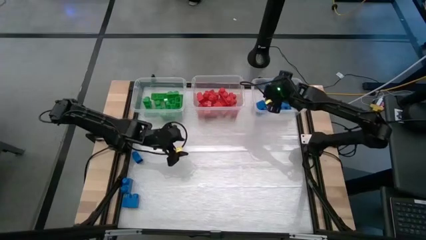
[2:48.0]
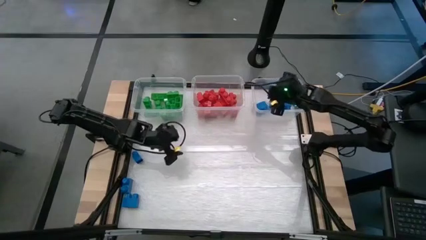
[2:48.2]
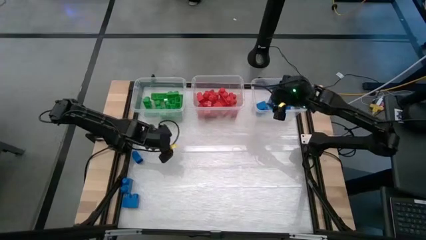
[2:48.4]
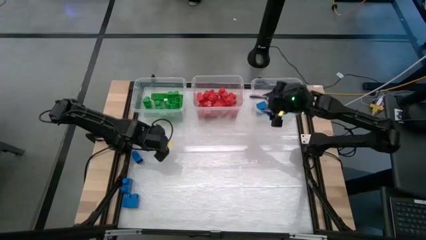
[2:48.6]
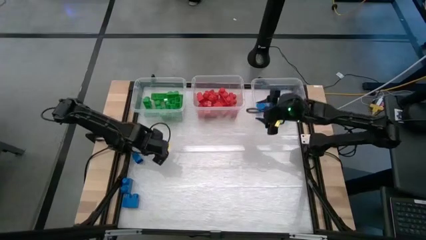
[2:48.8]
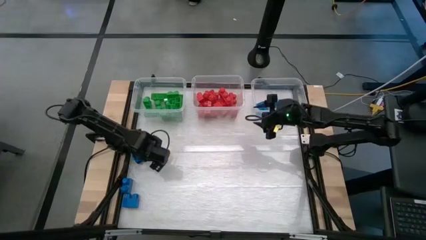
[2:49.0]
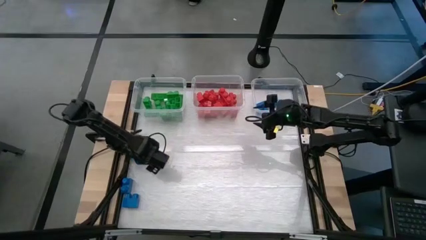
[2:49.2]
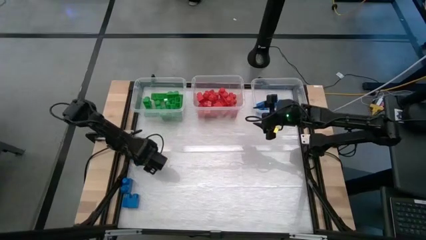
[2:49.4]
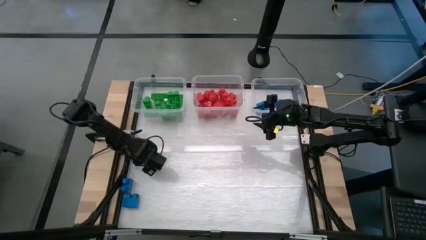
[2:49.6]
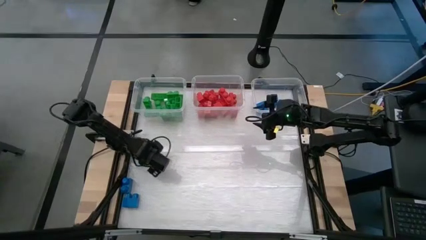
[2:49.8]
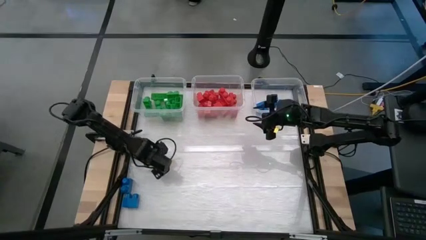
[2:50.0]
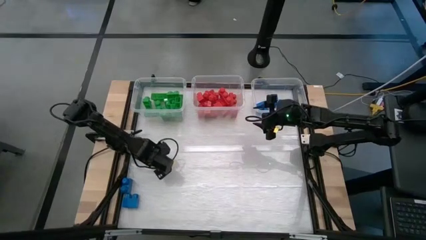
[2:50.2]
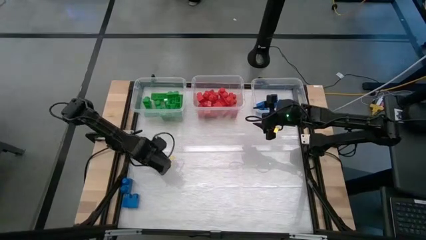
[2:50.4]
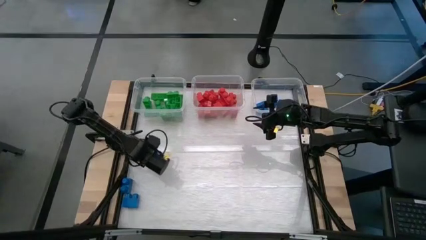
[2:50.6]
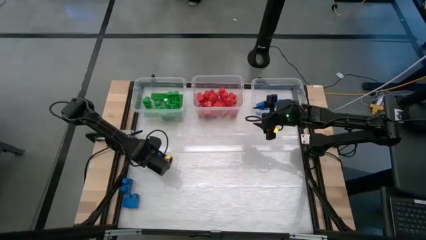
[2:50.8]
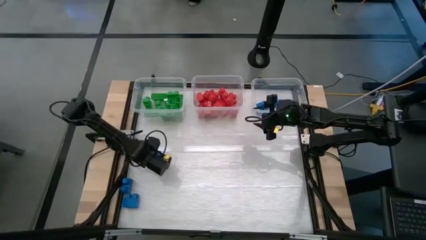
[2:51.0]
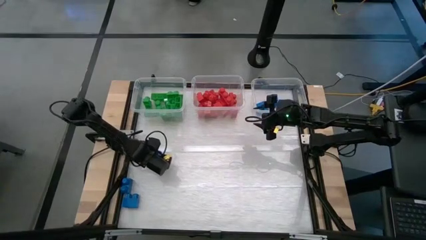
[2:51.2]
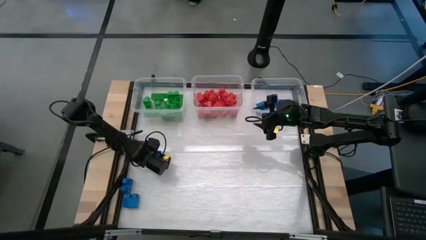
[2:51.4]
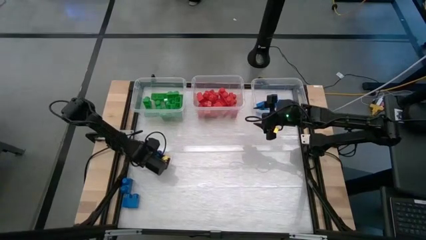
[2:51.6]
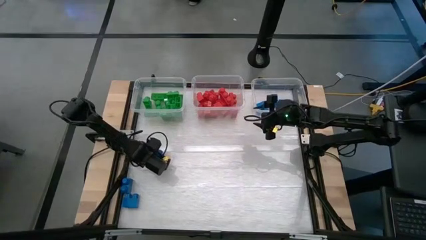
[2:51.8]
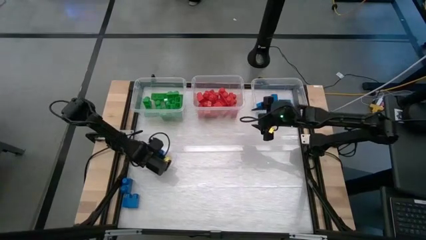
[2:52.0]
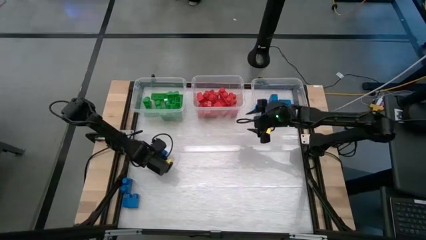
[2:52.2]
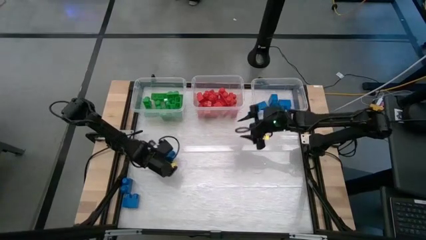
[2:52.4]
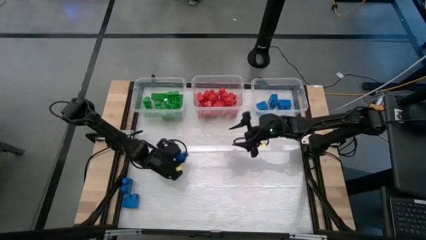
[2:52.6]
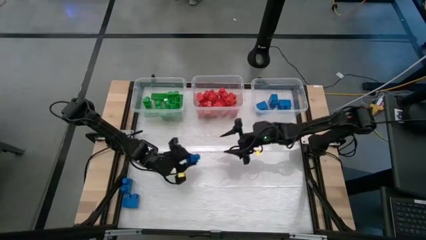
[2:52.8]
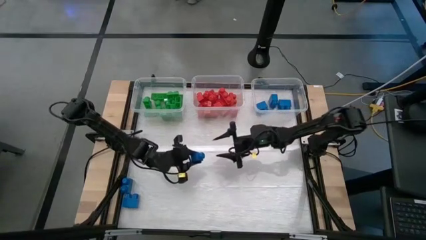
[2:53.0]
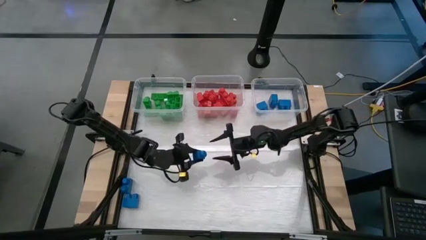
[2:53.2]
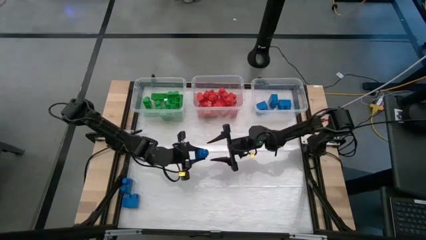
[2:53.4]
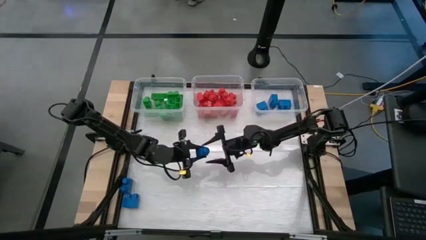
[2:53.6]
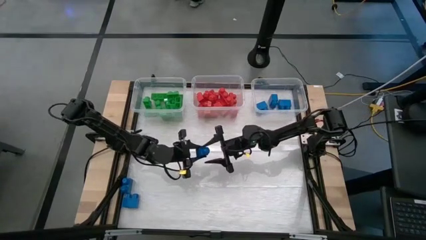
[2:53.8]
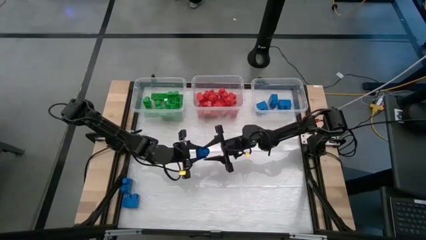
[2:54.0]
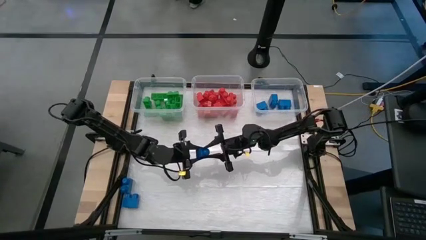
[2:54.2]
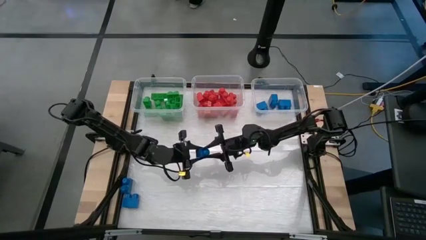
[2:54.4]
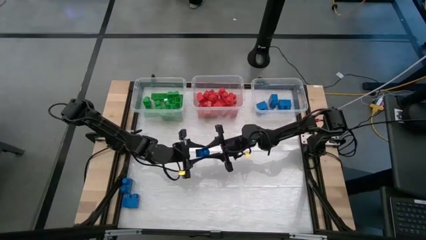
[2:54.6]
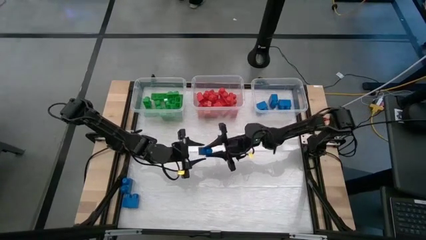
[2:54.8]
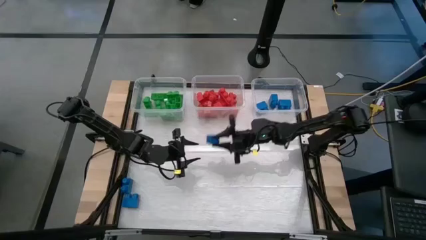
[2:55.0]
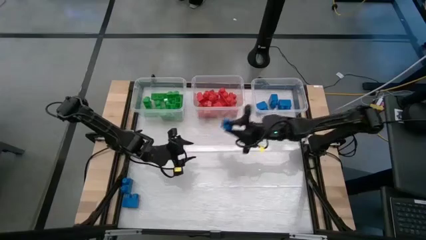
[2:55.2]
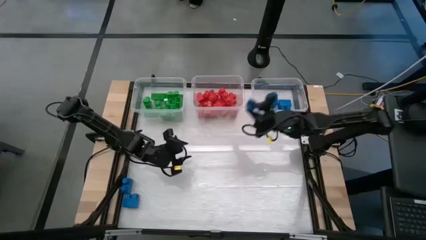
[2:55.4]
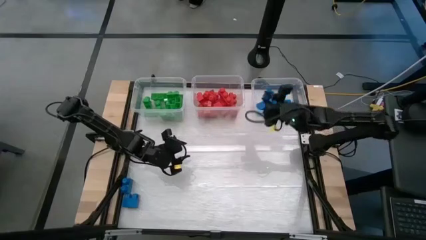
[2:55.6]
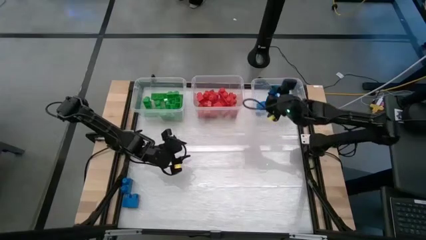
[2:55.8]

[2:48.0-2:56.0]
Task: Sort blocks
Put the blue game piece into the right transparent bin

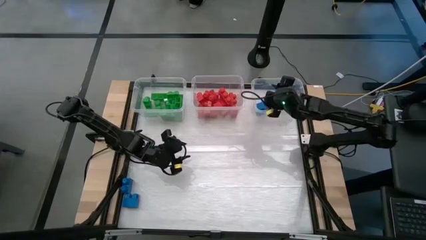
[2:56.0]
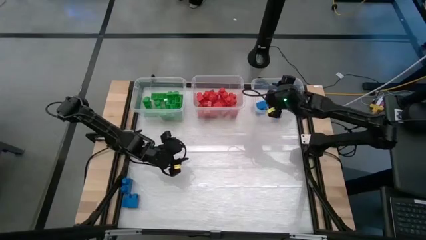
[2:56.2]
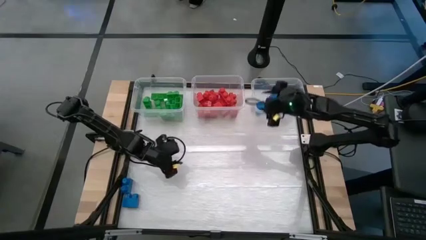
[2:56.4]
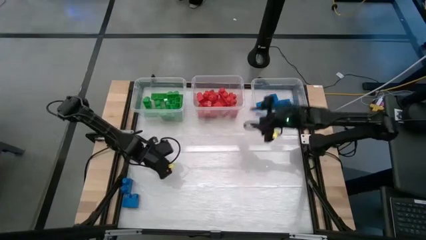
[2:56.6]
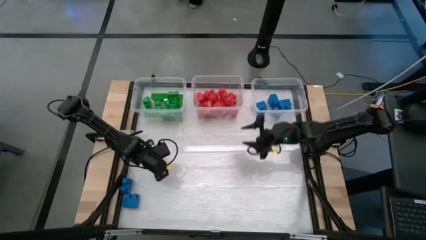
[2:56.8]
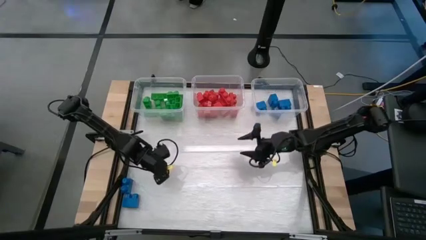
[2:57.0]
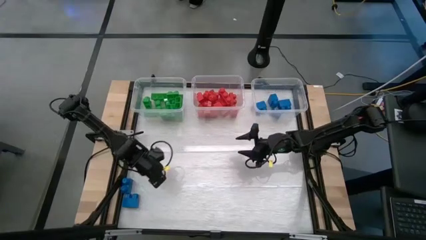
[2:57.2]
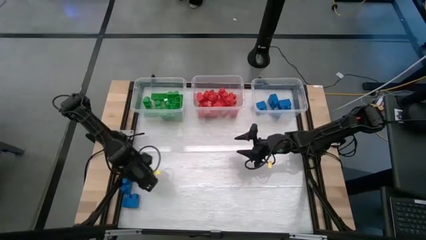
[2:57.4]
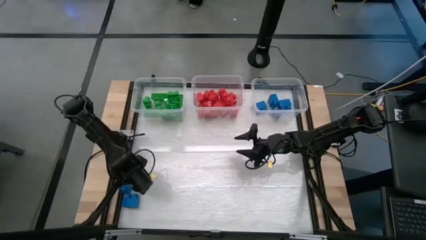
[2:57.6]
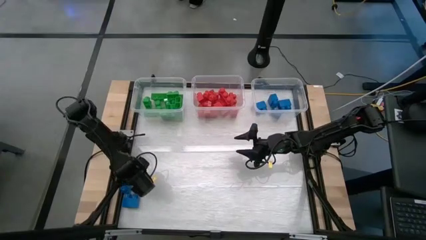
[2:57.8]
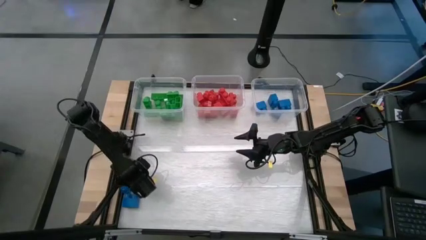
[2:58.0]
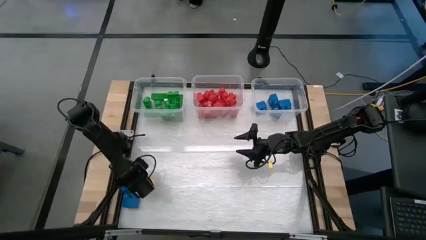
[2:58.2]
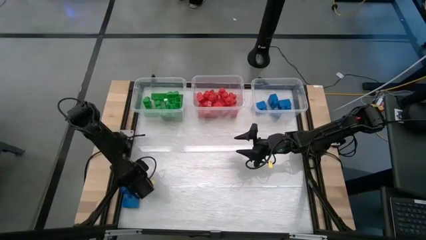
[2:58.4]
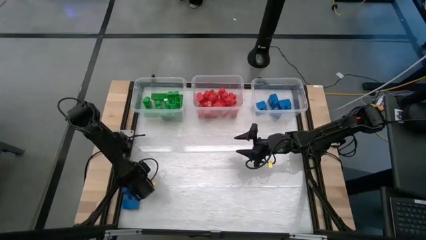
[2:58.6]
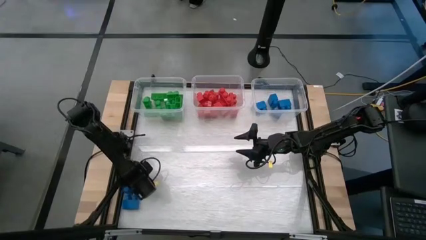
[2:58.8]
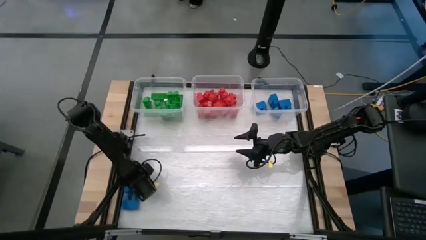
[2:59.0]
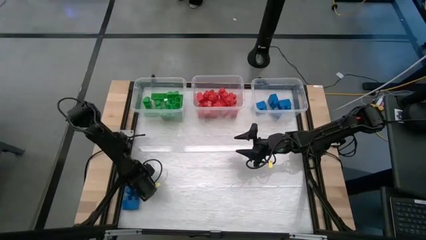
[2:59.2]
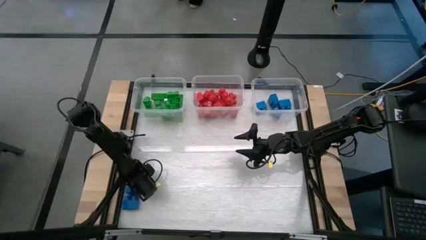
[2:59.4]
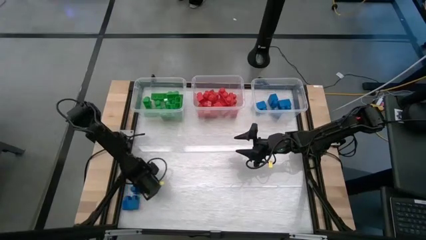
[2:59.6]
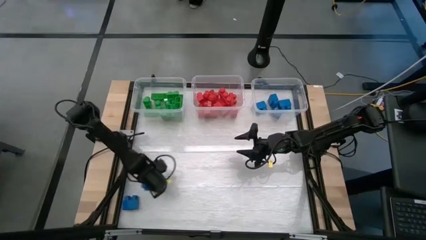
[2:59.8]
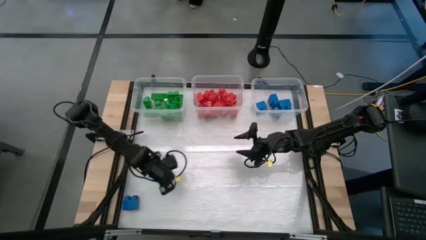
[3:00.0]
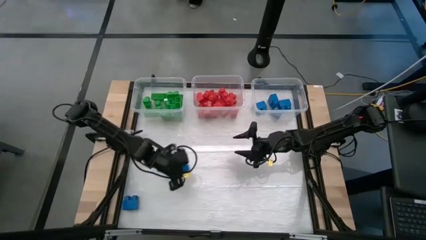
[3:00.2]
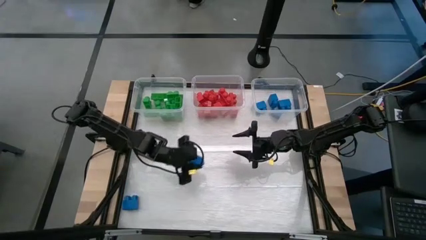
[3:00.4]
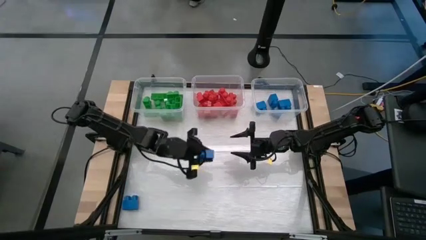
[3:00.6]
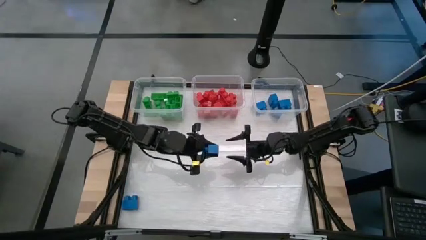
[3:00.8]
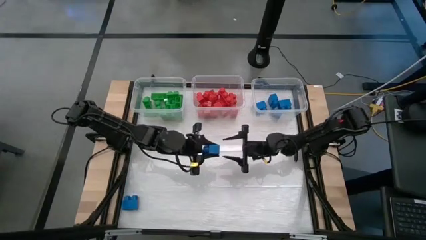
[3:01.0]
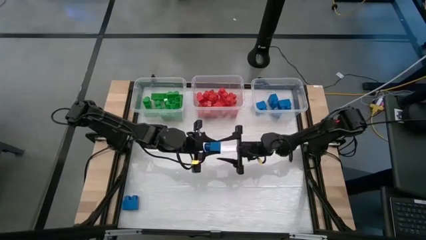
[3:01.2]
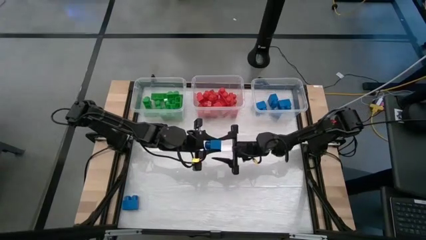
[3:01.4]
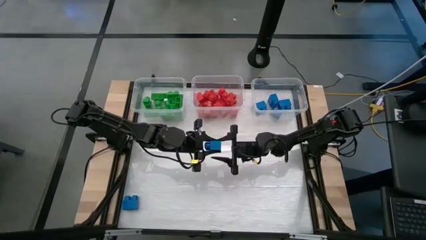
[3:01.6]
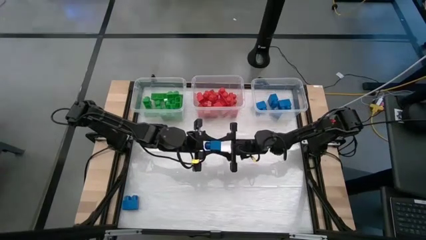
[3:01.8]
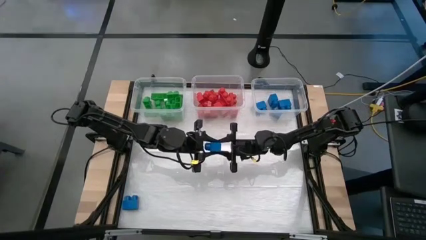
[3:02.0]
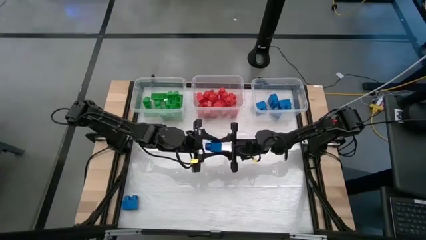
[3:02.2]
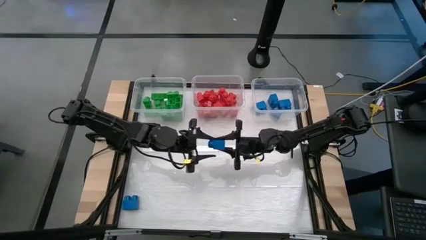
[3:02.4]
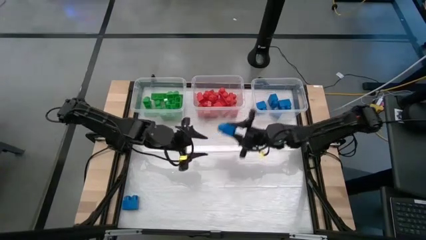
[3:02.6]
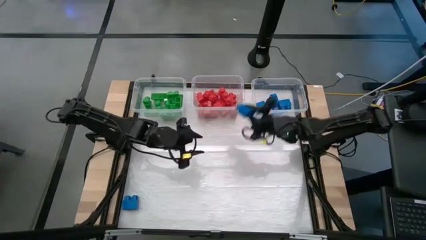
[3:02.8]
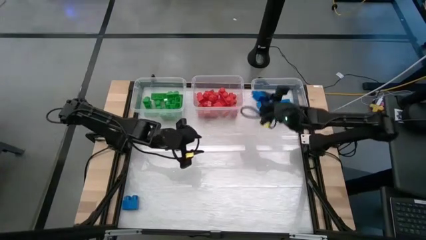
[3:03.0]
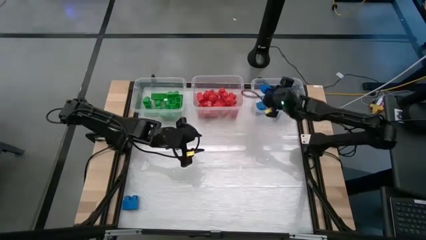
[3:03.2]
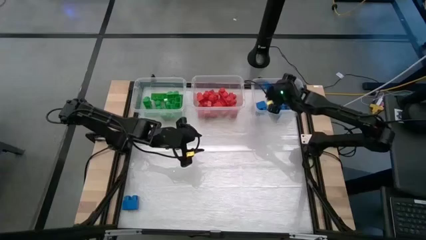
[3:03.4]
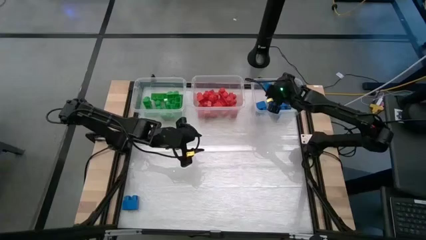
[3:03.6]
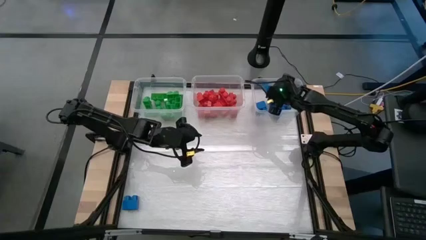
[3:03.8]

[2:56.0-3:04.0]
Put the blue game piece into the right transparent bin

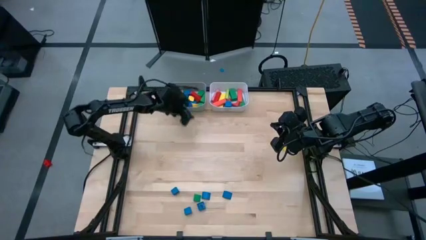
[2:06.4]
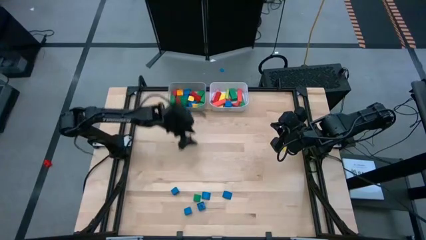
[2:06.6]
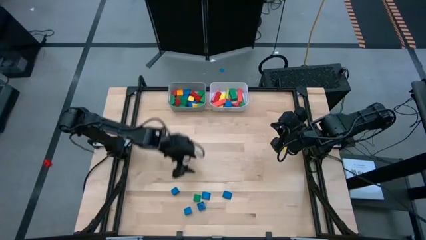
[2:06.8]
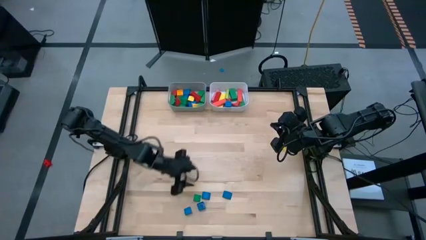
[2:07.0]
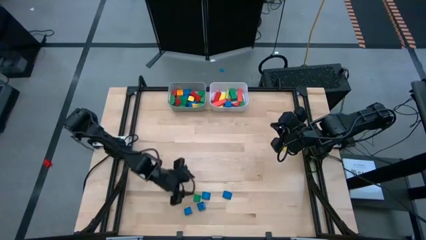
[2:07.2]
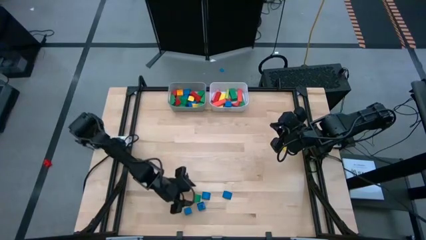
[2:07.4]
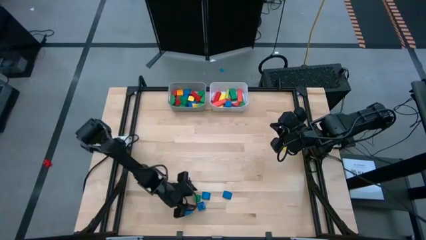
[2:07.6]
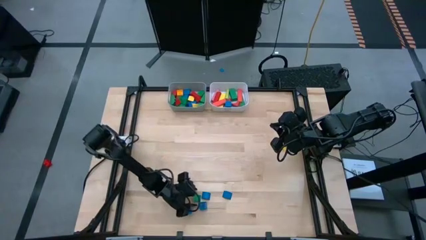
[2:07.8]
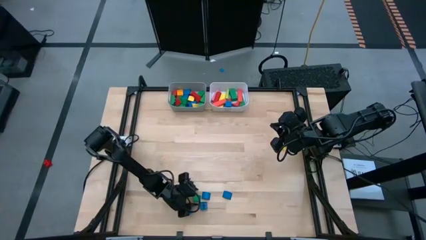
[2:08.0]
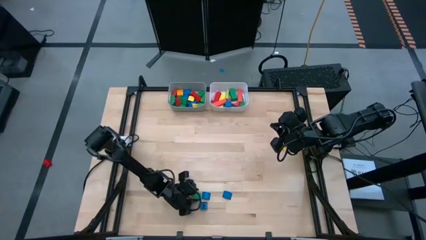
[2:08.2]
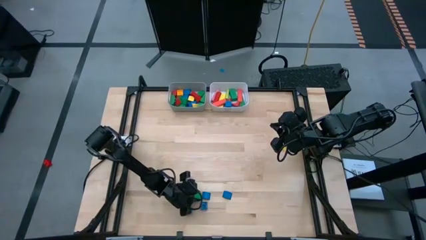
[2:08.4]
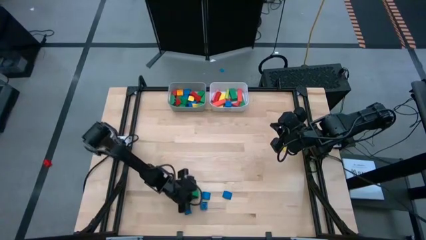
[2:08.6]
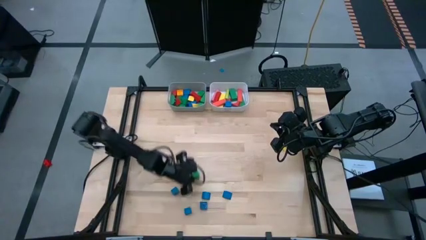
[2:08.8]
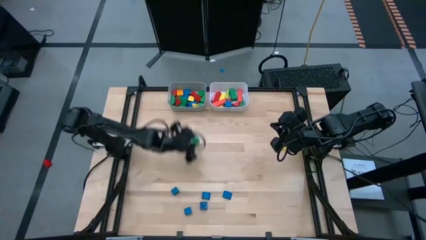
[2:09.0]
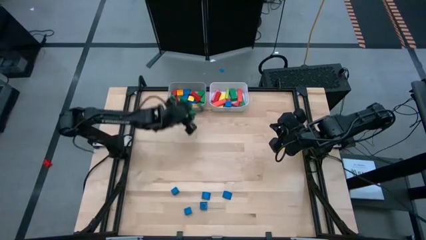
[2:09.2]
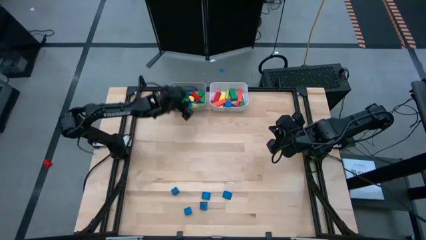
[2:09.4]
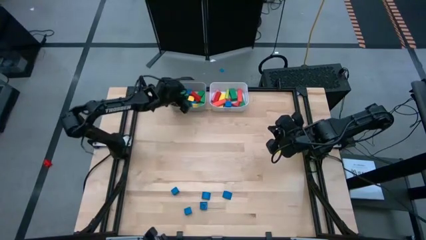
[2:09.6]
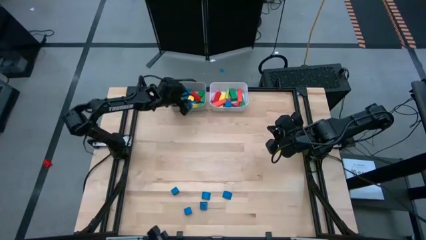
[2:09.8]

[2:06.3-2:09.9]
Task: Sort blocks by size
Put the green triangular block into the gray bin
